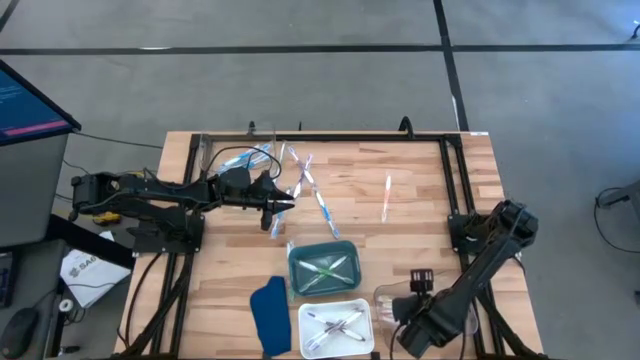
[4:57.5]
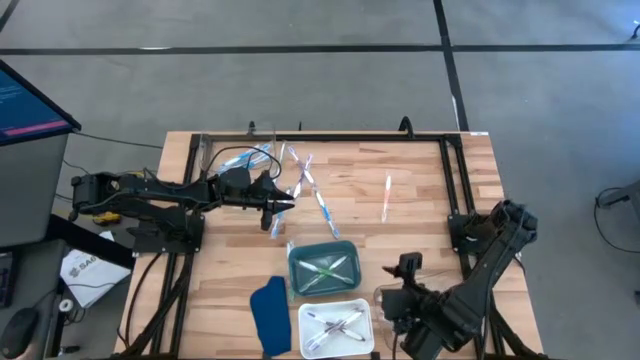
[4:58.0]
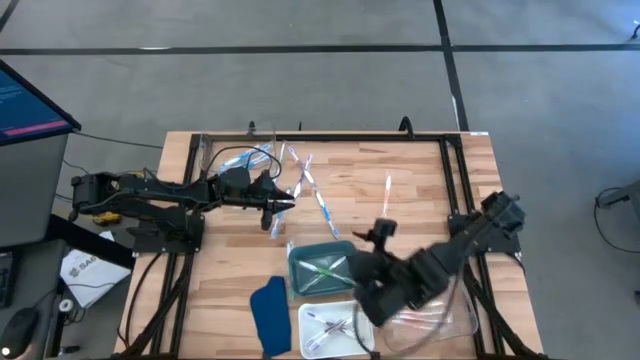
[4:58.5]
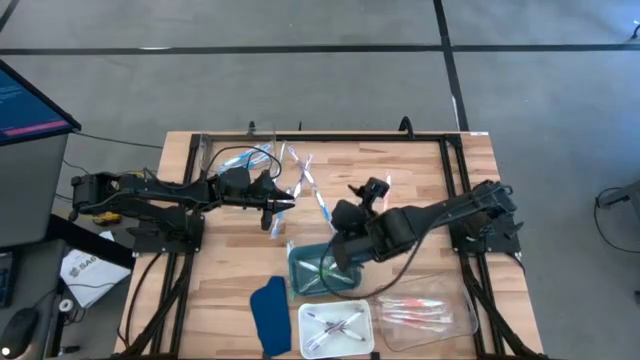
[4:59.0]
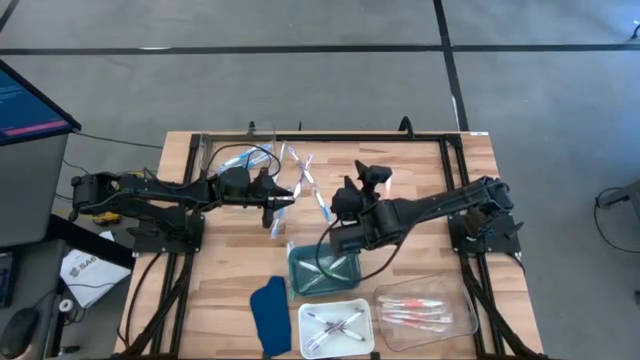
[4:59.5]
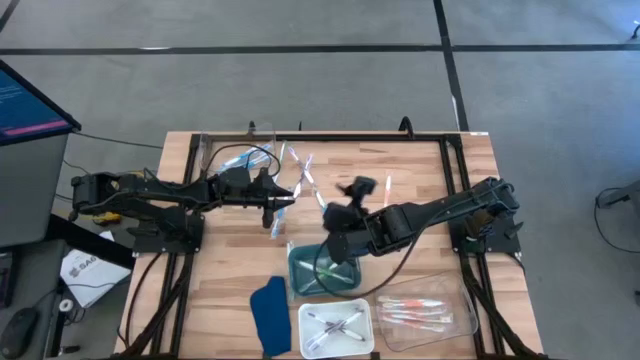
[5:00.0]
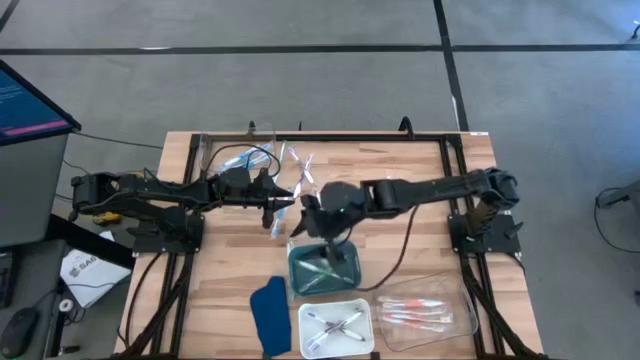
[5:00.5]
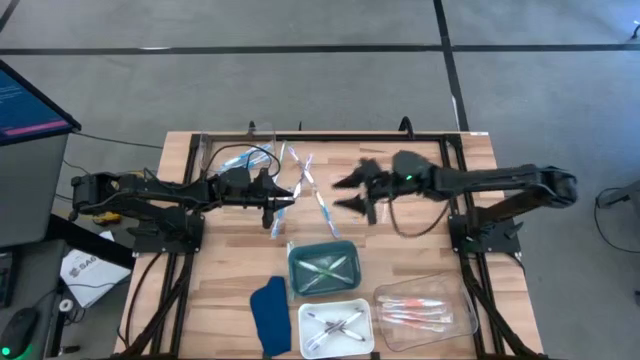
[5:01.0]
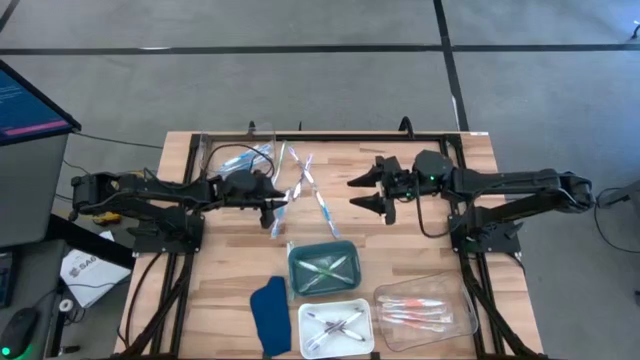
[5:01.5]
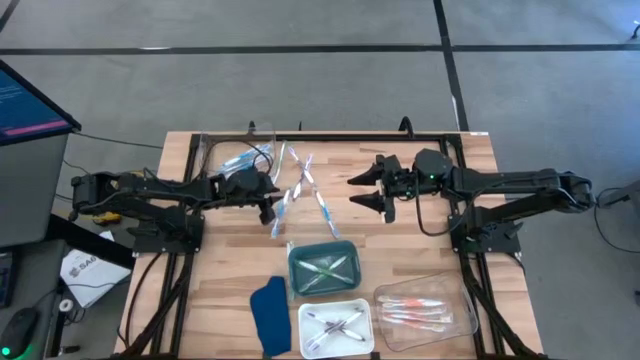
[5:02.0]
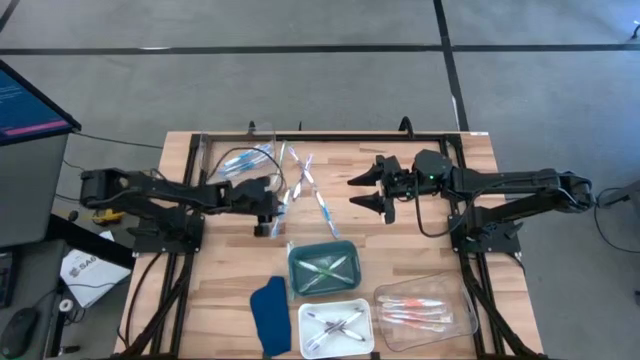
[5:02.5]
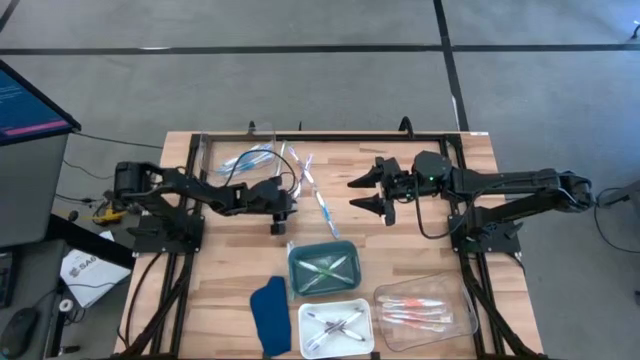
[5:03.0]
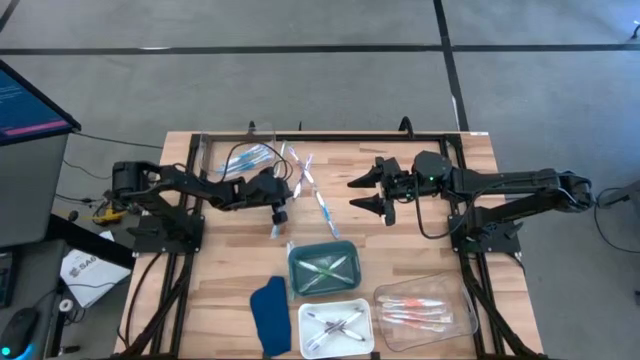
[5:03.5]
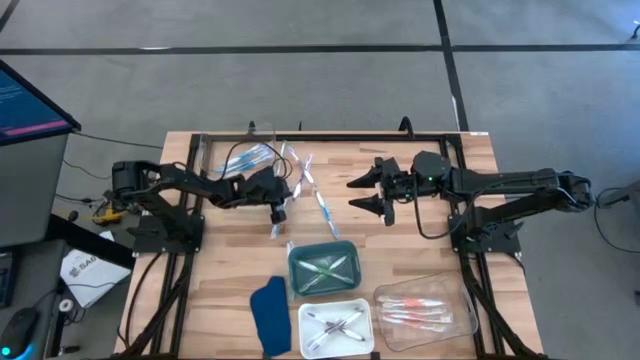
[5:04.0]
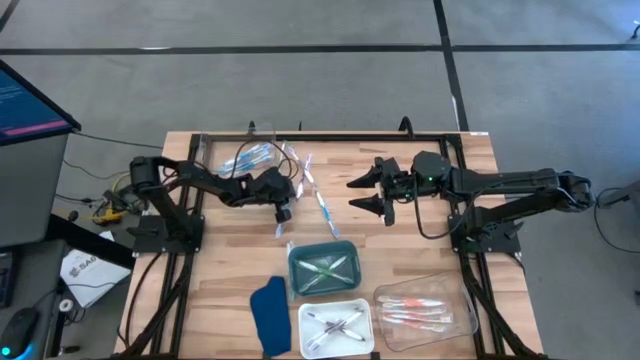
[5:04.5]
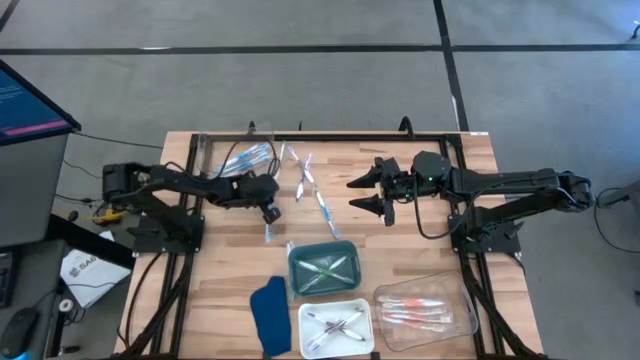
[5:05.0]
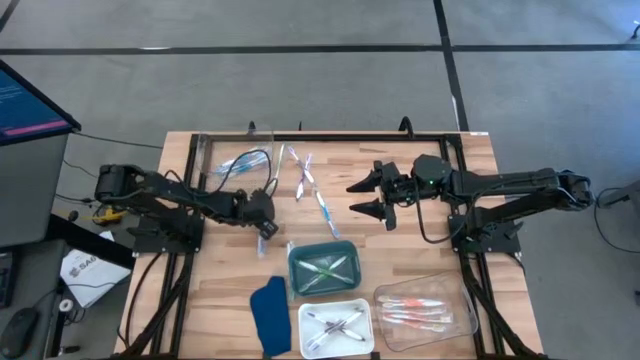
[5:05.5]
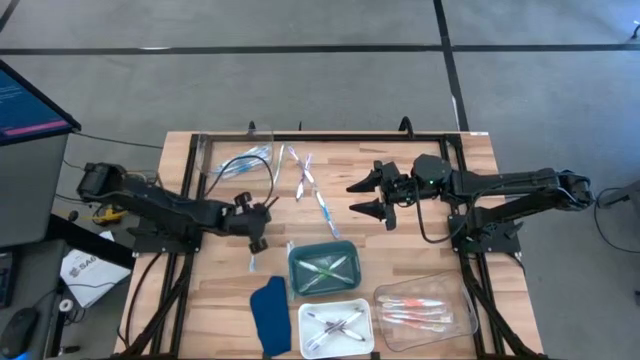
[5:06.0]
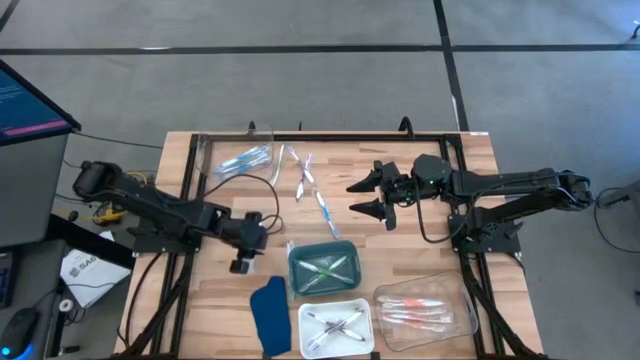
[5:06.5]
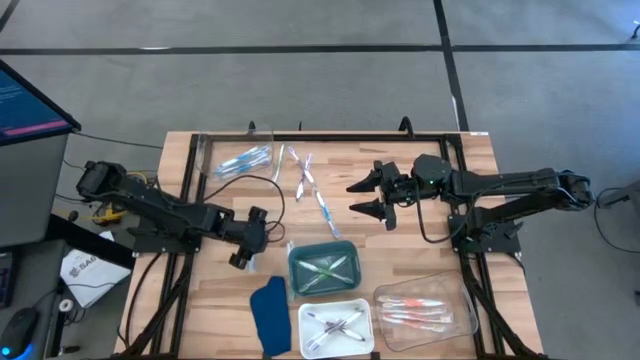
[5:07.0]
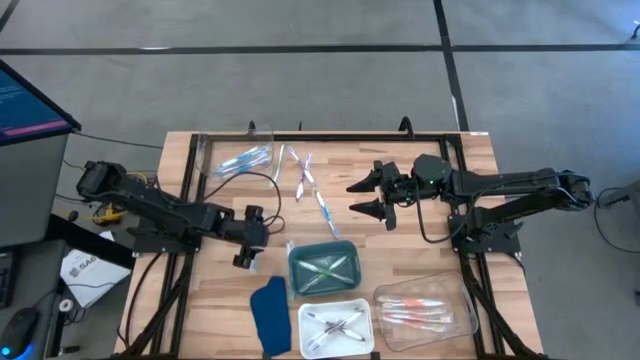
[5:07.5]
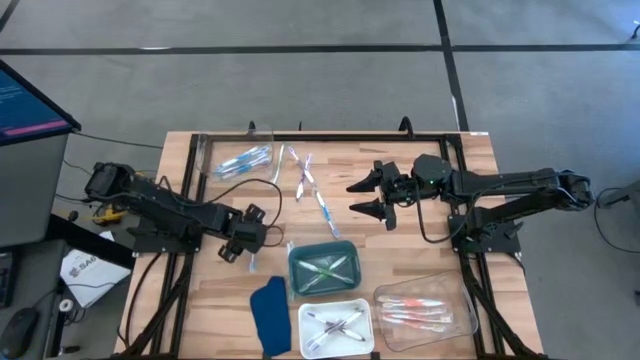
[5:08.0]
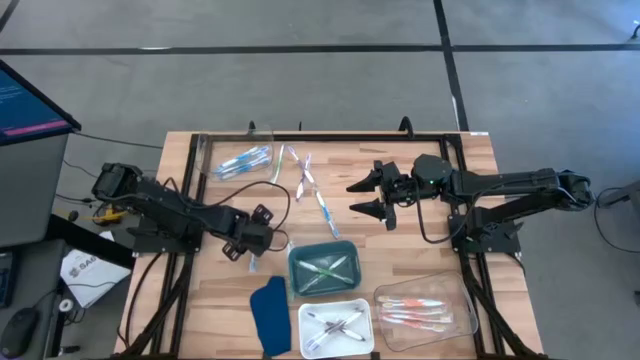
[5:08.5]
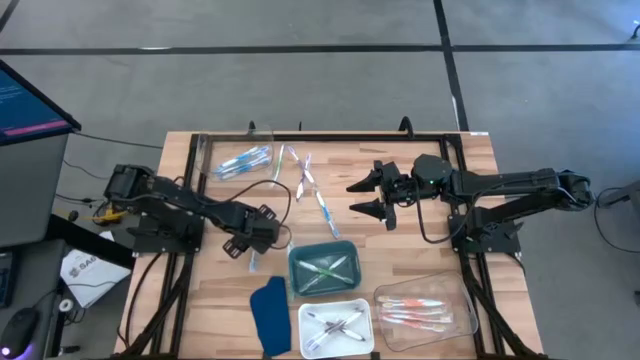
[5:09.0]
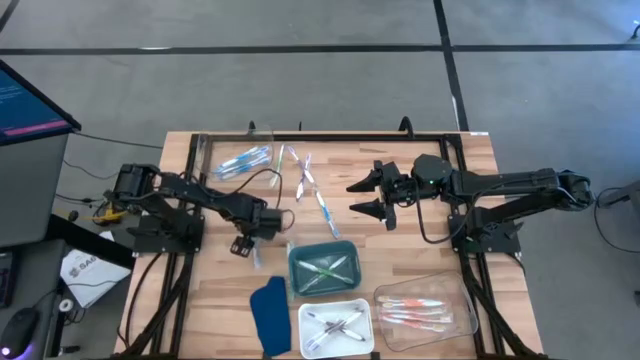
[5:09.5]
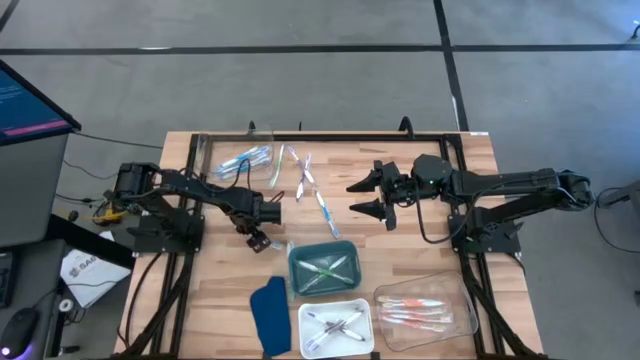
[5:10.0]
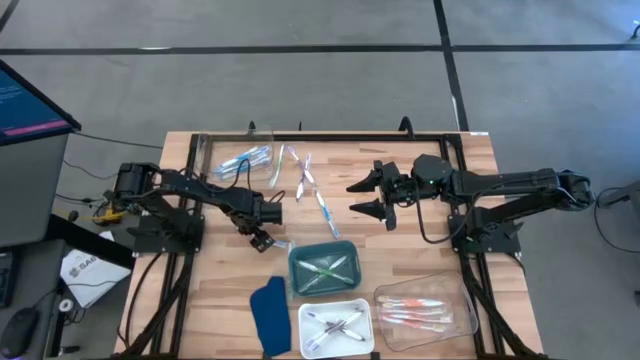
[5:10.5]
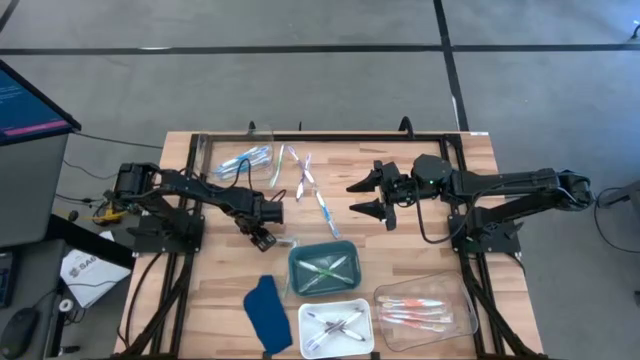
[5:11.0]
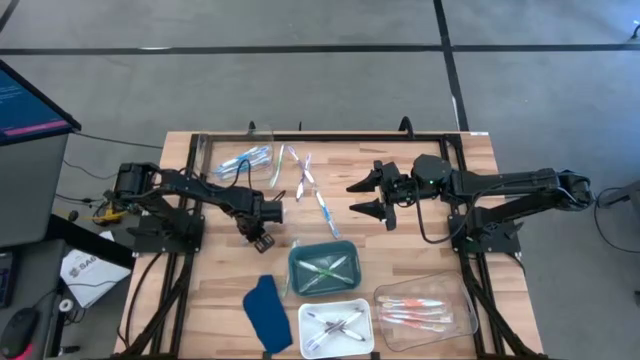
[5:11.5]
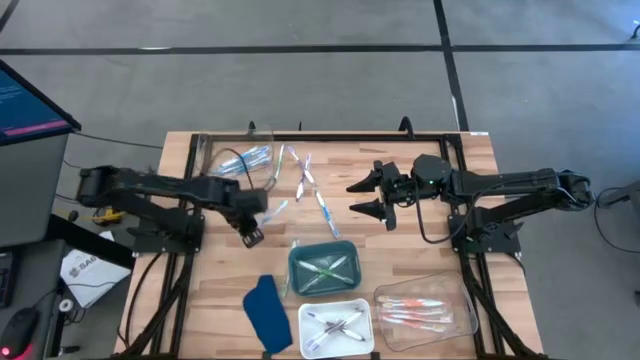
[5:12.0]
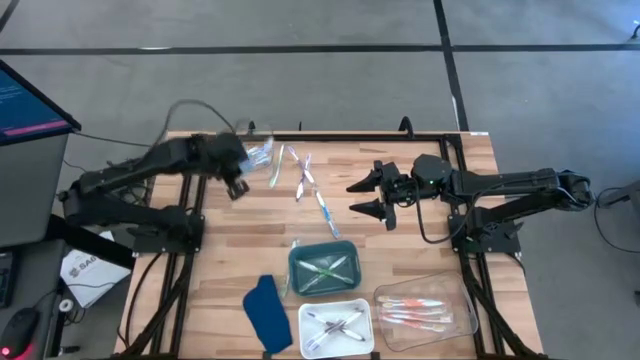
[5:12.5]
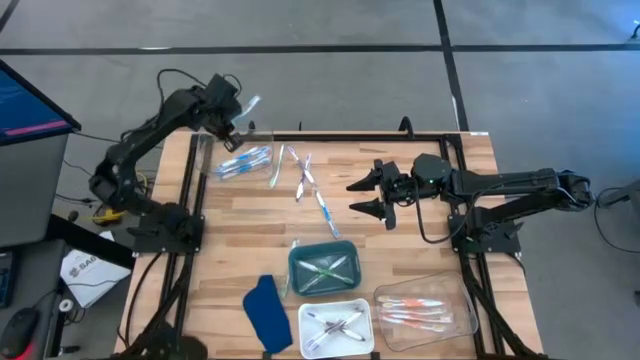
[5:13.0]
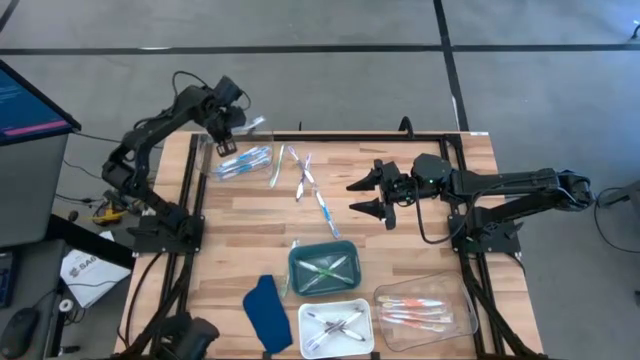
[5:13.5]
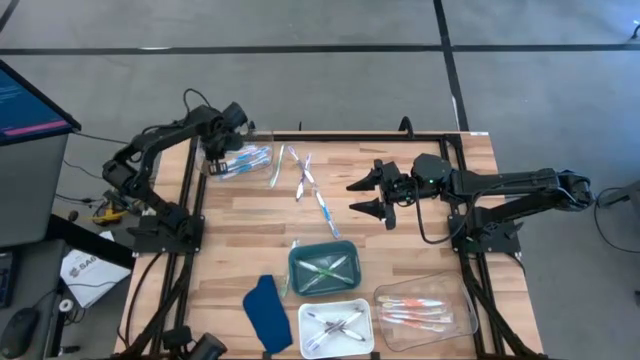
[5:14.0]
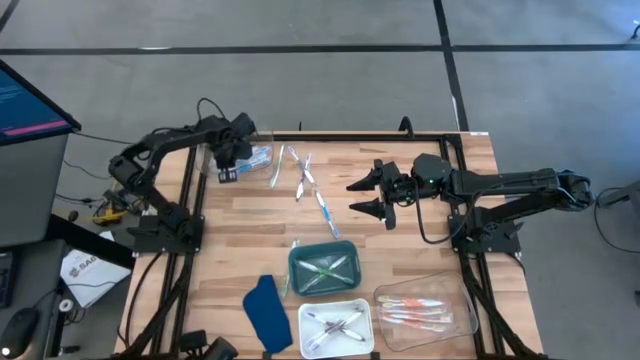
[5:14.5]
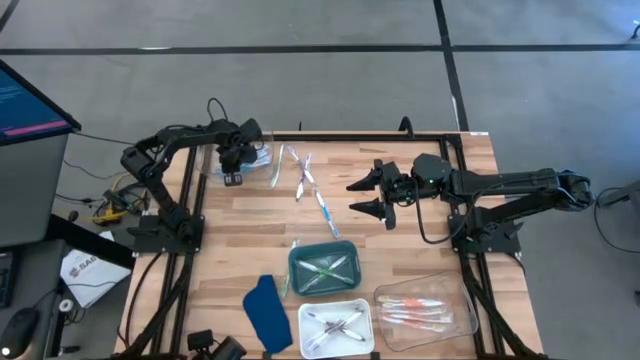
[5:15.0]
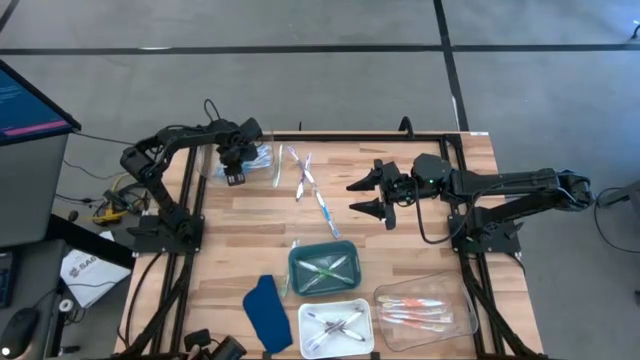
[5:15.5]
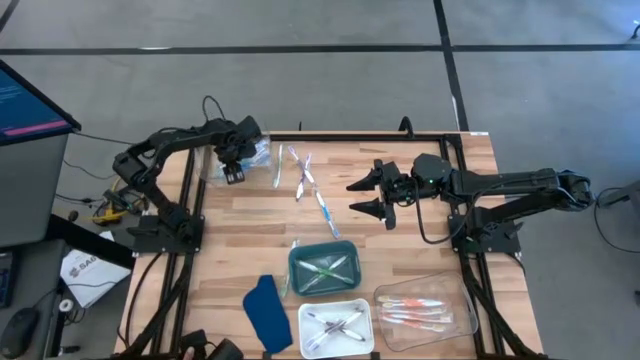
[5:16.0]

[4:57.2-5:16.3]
Task: Pick & Place Toothbrushes
Put the blue toothbrush into the top transparent bin

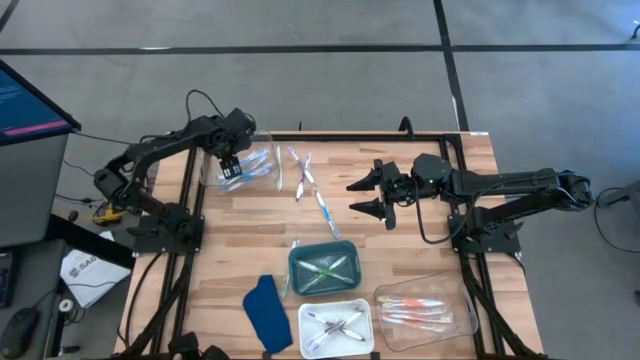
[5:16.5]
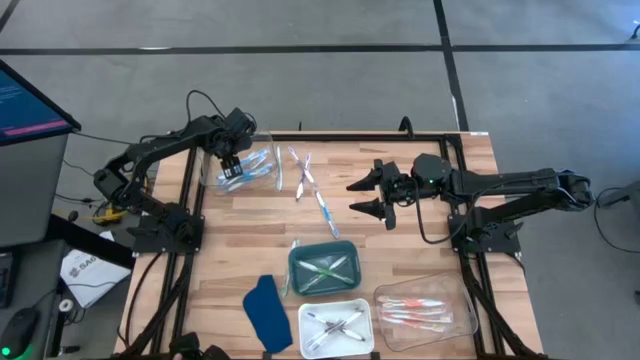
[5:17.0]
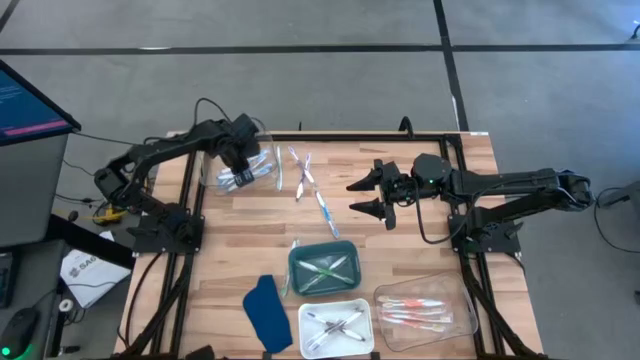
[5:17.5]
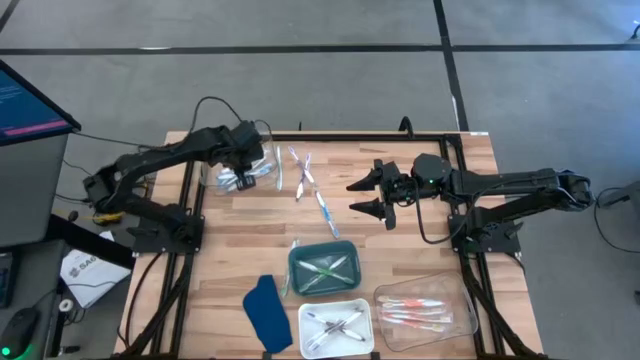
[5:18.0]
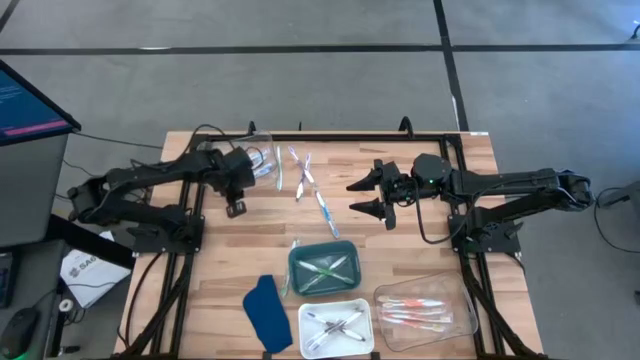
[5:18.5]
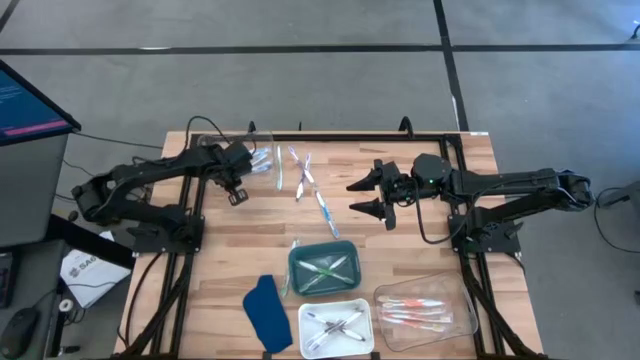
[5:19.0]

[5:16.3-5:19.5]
Adjust the top transparent bin
